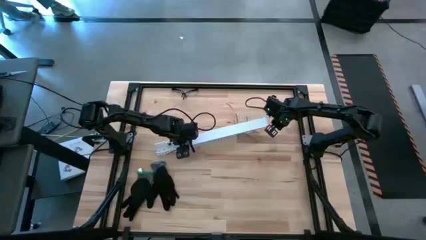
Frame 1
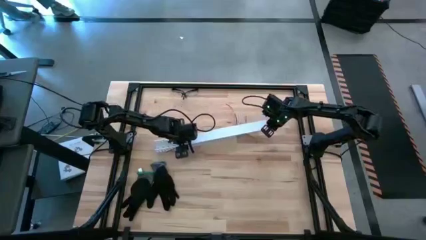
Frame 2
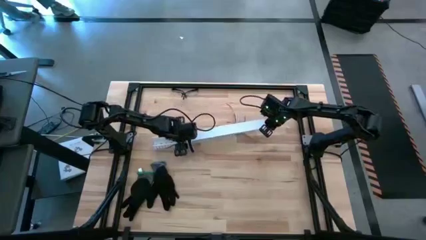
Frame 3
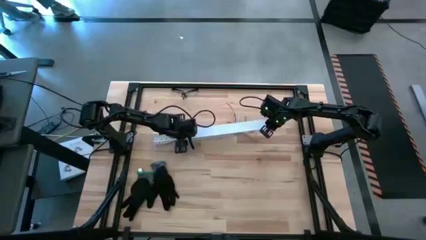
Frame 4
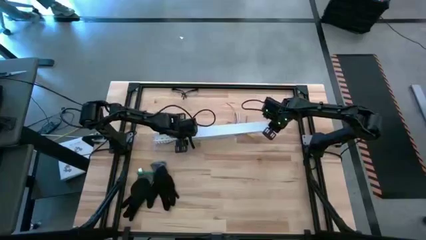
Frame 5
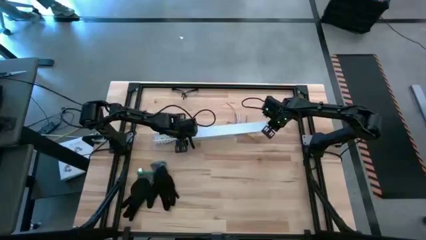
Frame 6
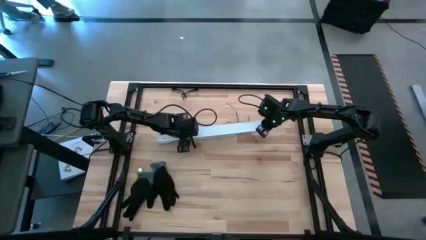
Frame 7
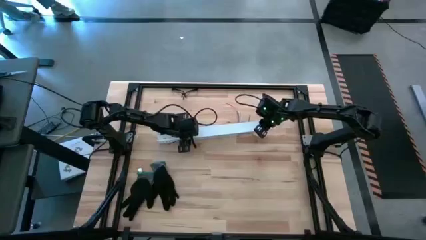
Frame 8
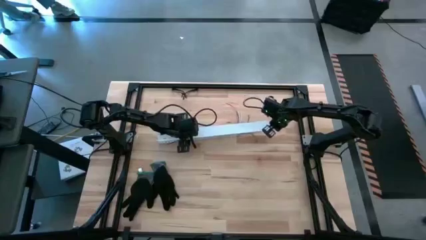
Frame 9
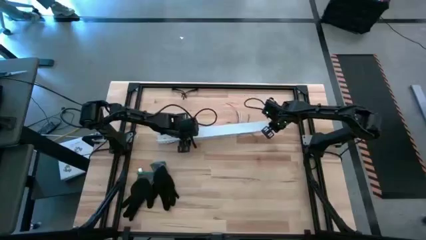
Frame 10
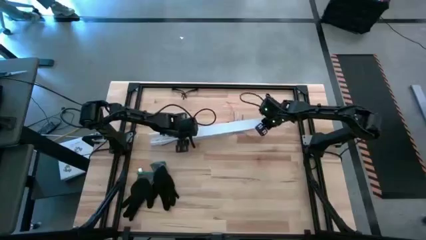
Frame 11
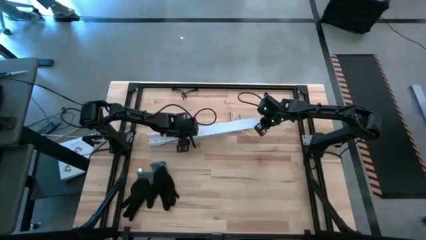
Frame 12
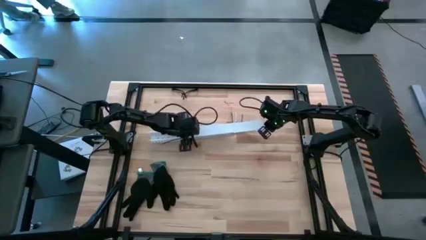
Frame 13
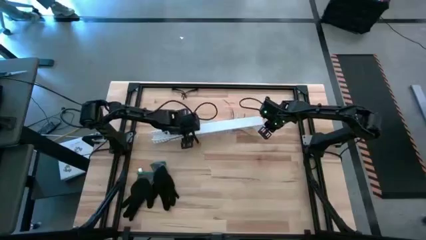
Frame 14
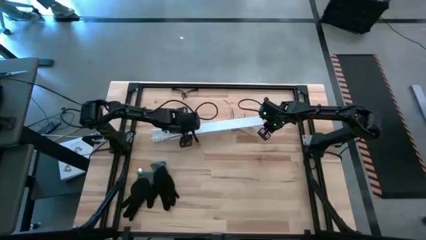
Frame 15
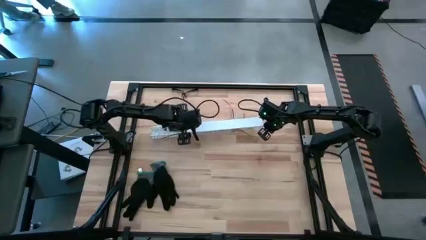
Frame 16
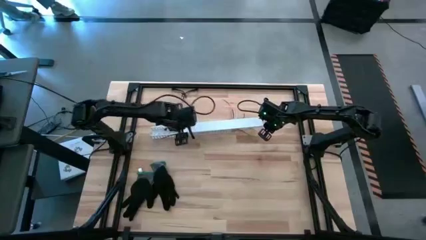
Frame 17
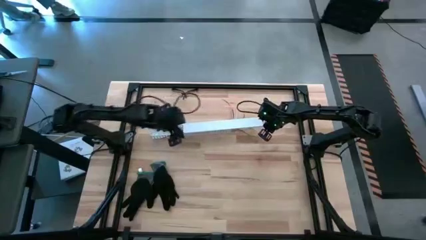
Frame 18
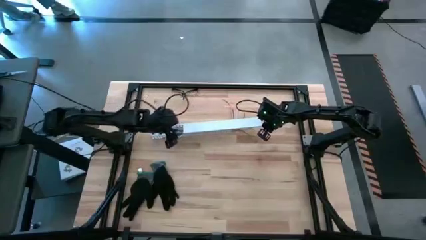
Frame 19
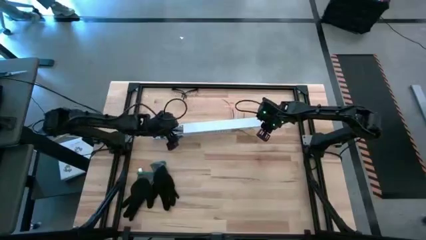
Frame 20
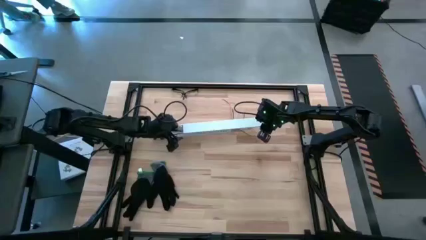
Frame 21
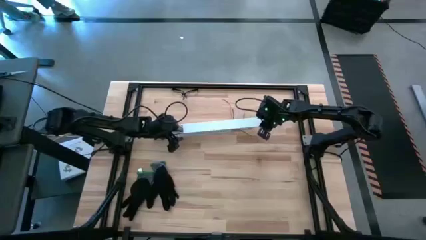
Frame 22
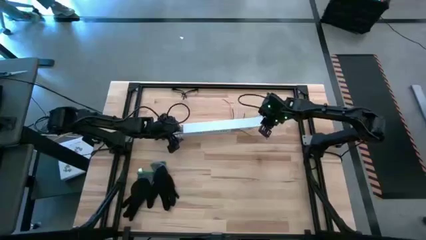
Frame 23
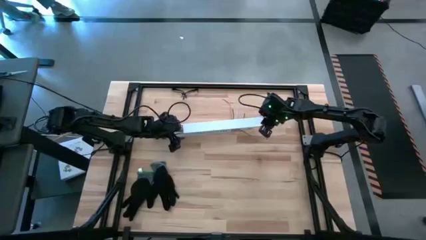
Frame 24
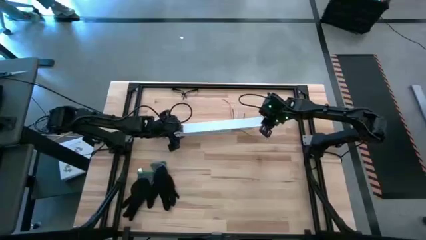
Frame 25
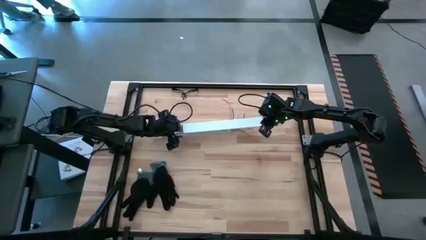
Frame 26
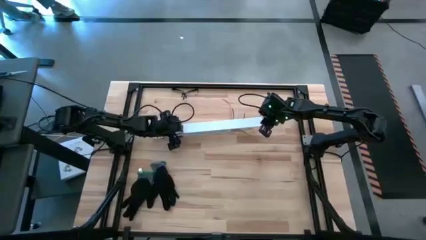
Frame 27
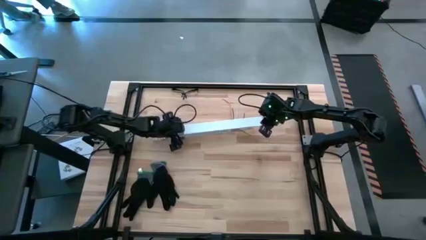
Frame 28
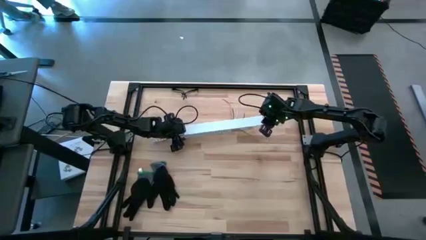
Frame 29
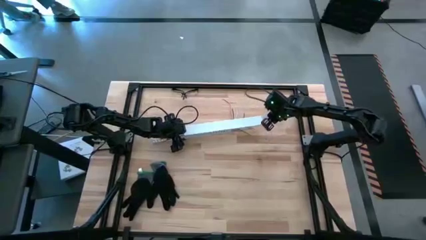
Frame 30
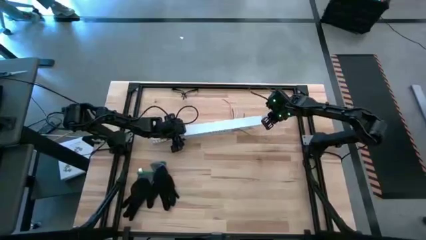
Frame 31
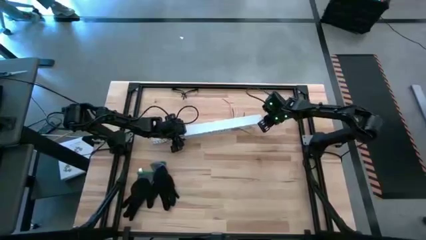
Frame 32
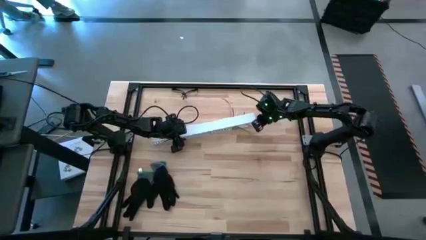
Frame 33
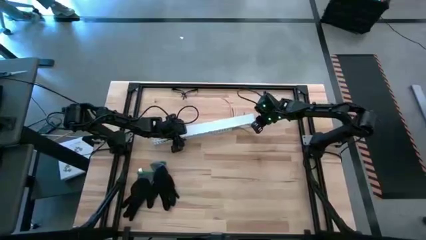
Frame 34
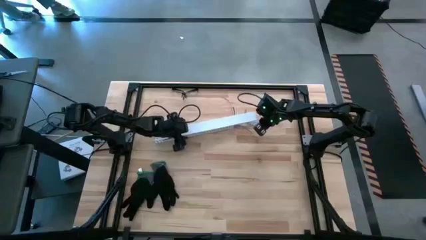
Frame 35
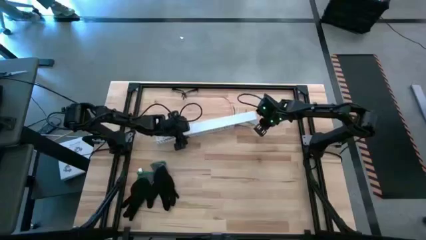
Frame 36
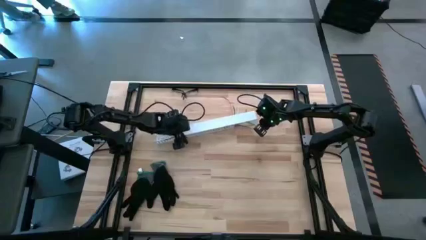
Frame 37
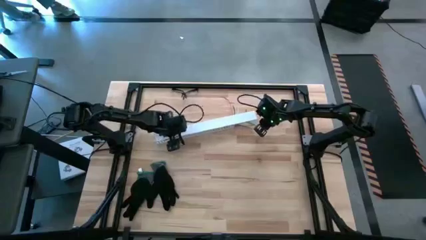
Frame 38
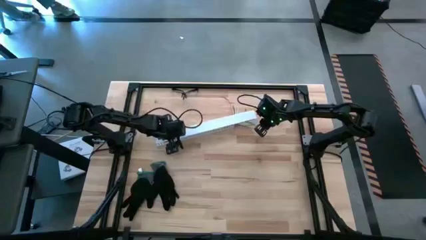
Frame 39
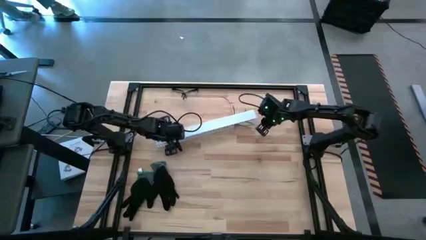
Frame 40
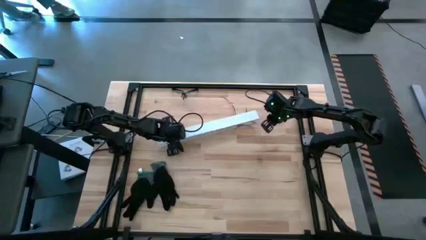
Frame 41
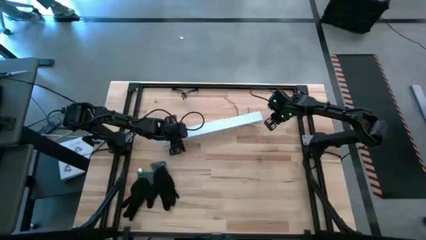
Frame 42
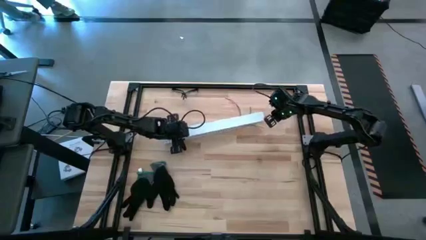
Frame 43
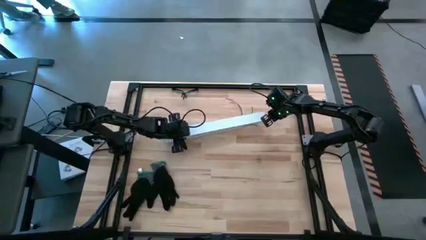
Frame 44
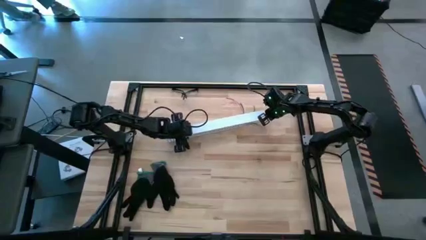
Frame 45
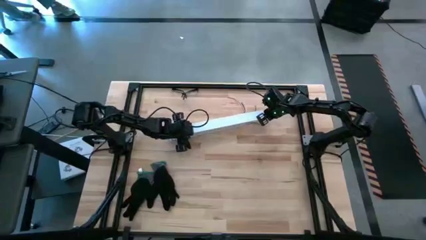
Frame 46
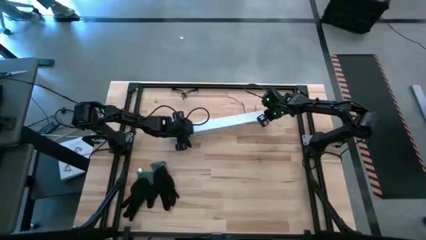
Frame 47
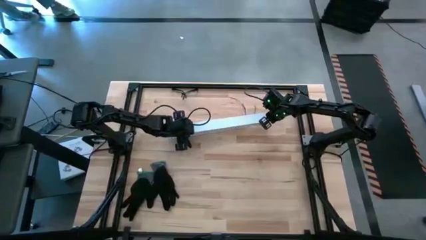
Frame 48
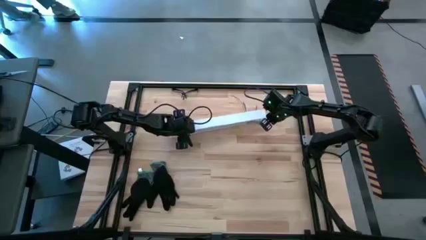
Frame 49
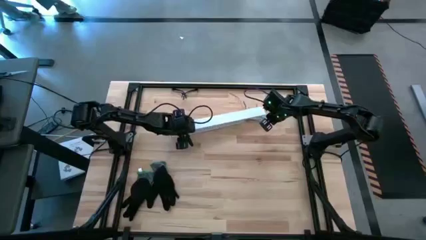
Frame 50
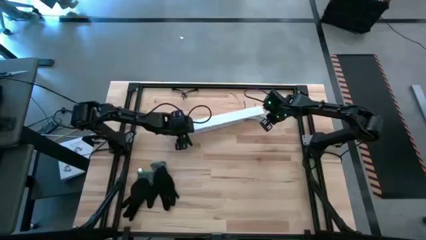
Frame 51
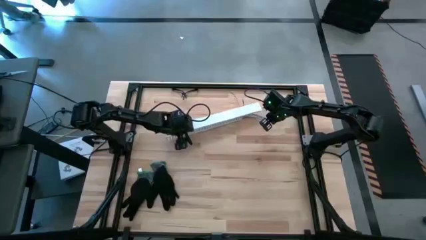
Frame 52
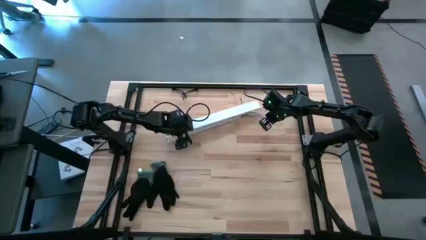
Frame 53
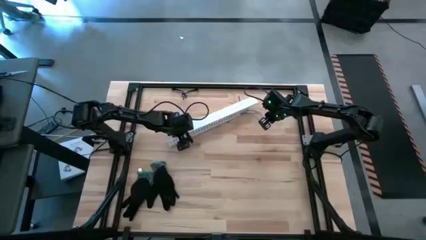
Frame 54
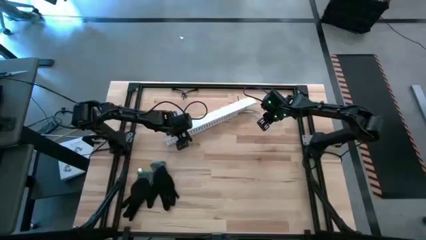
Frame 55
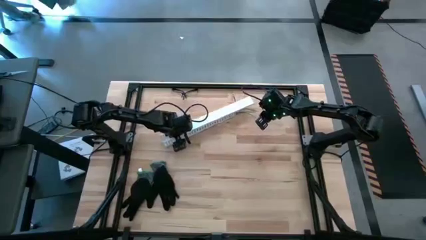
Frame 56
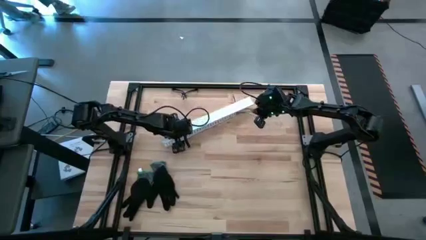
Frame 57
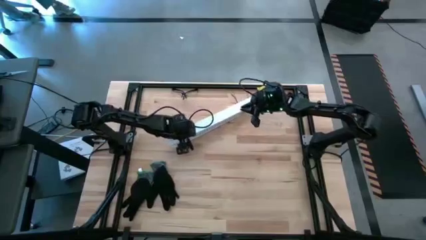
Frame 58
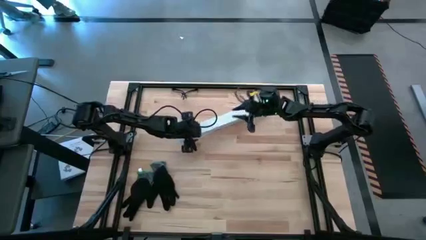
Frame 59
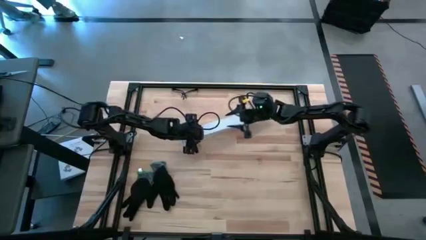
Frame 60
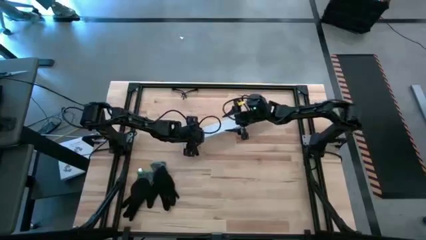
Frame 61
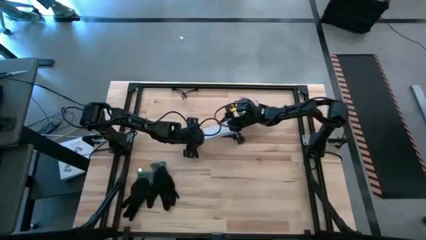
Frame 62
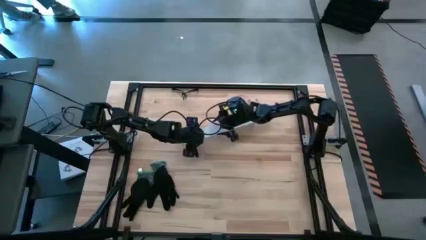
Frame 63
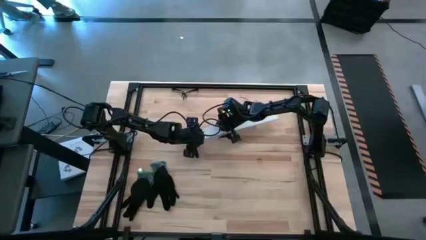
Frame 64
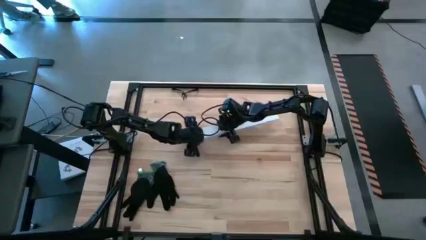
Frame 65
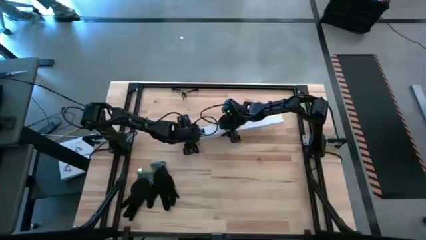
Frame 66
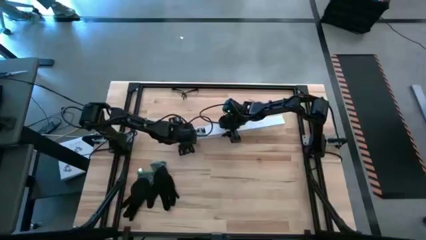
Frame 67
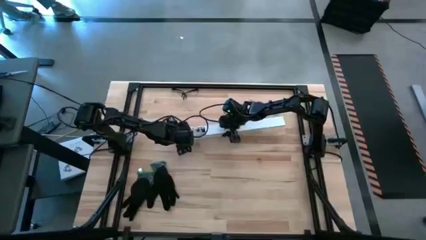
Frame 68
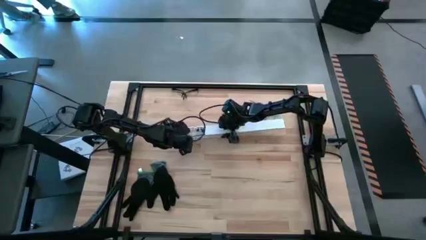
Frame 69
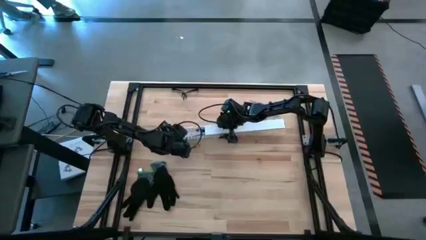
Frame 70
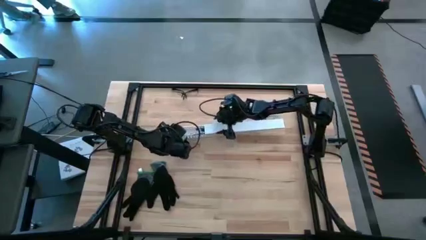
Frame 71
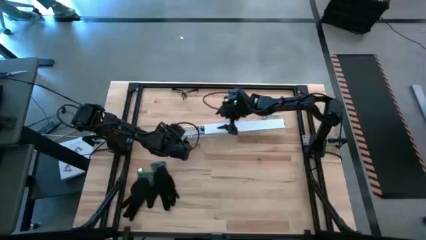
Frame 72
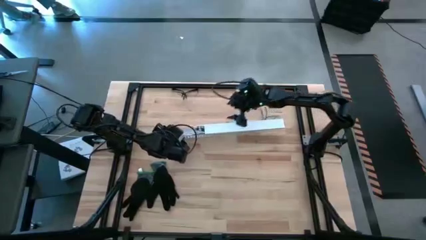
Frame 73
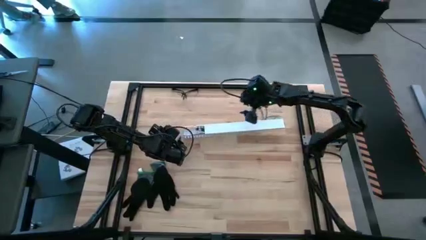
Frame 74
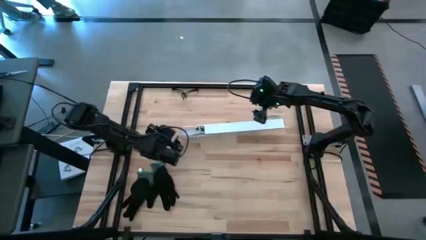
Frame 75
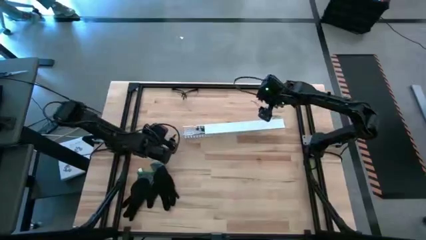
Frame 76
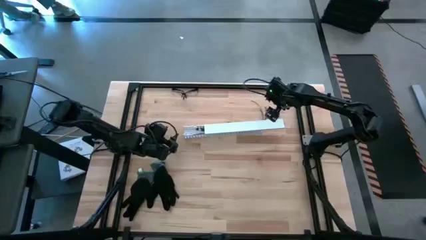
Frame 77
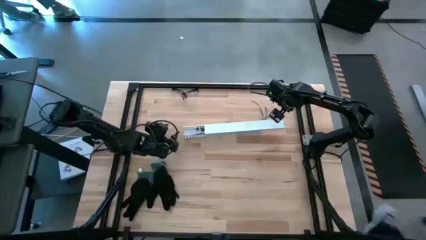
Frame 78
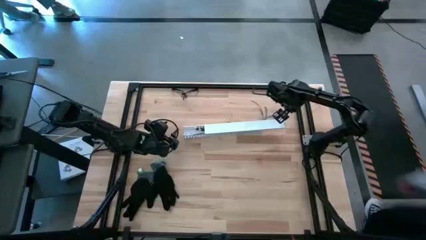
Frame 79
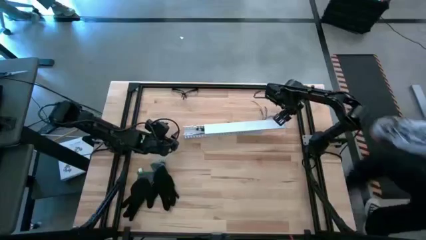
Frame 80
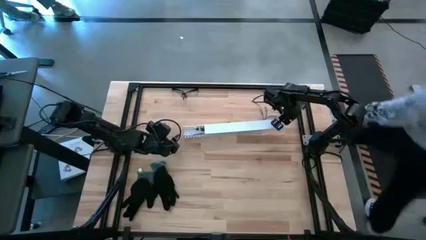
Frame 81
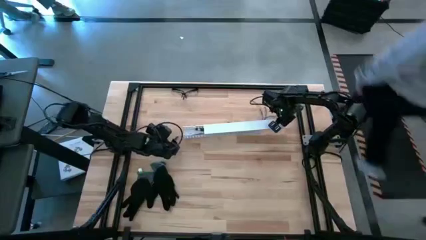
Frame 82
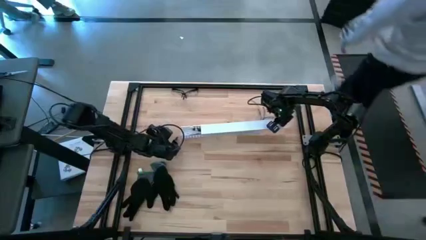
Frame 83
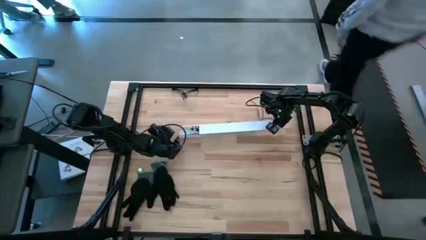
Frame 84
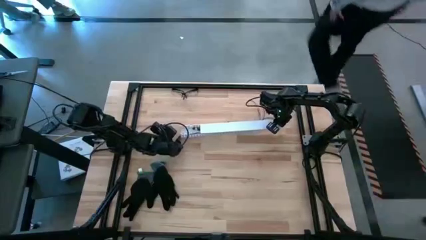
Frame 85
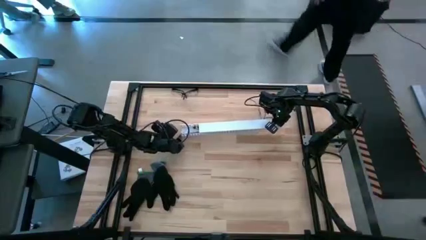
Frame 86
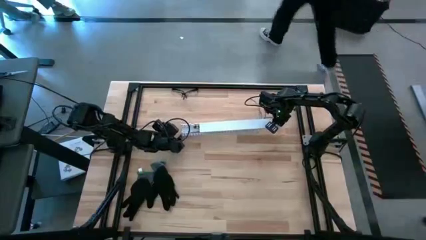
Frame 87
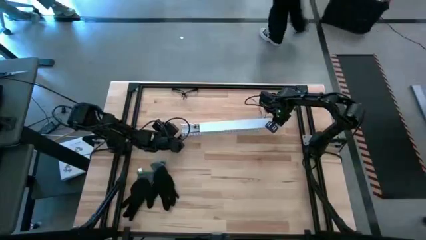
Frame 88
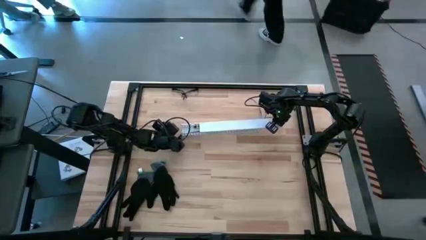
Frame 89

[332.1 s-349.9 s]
Task: Ziptie cables
Close the white cable duct
